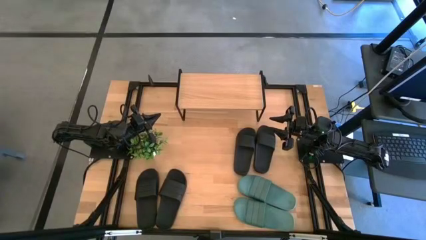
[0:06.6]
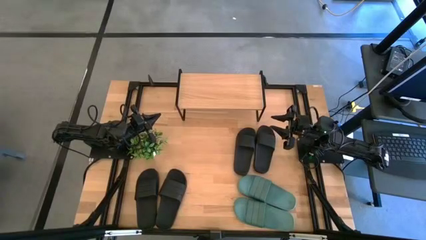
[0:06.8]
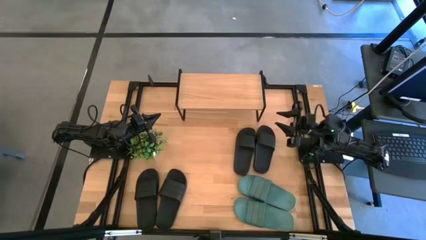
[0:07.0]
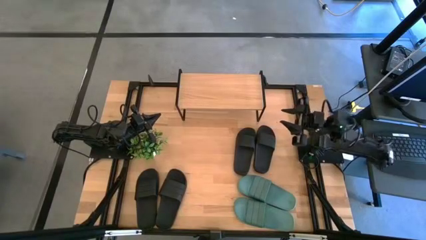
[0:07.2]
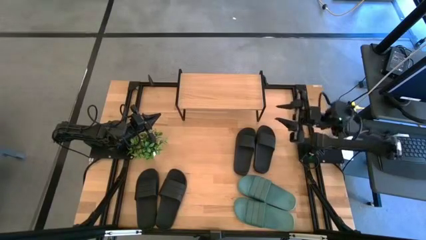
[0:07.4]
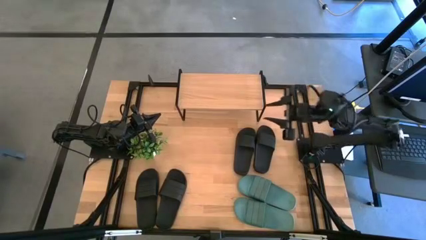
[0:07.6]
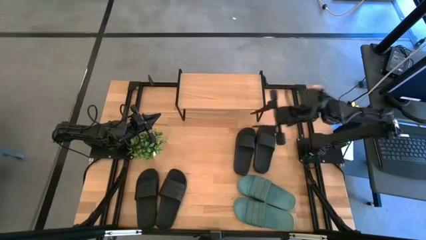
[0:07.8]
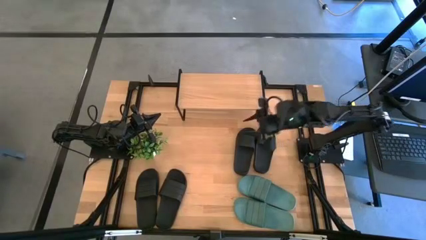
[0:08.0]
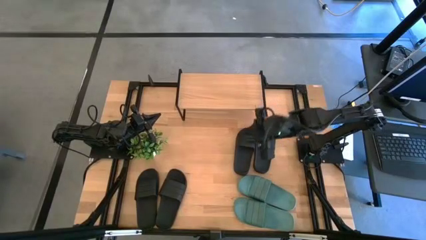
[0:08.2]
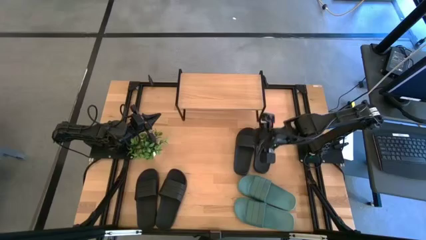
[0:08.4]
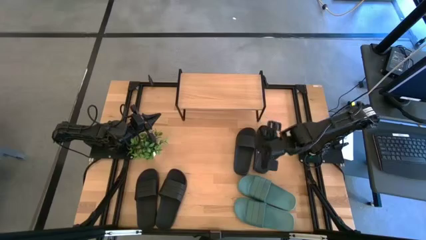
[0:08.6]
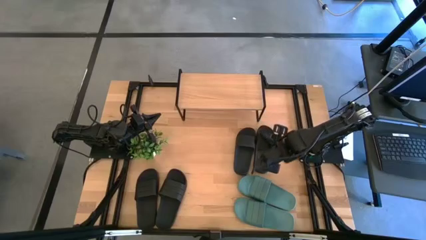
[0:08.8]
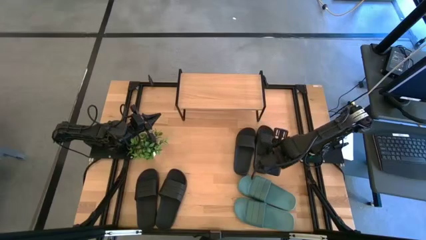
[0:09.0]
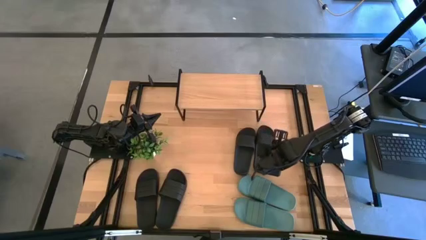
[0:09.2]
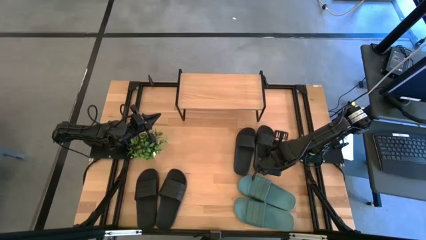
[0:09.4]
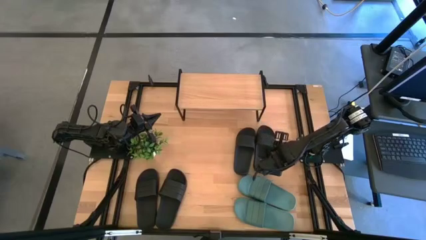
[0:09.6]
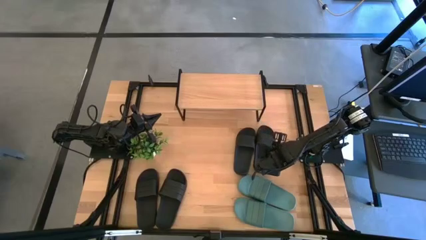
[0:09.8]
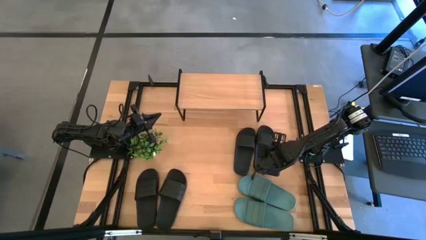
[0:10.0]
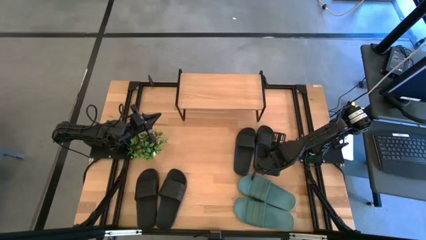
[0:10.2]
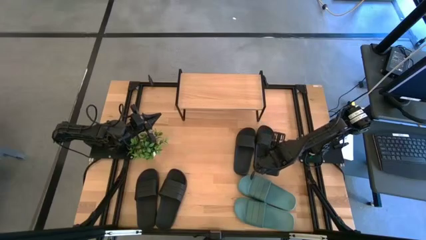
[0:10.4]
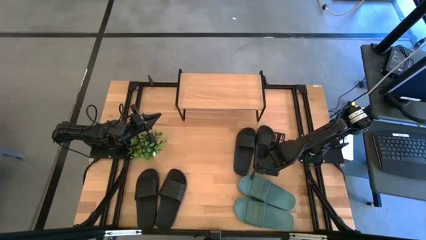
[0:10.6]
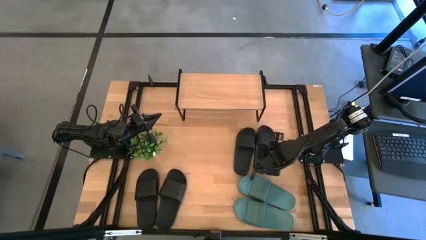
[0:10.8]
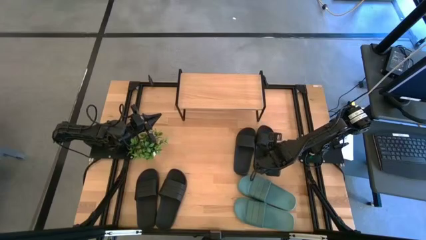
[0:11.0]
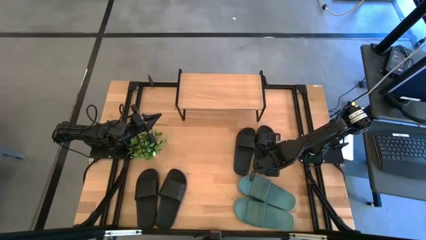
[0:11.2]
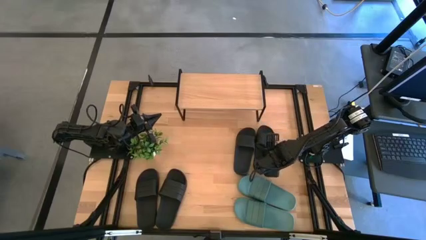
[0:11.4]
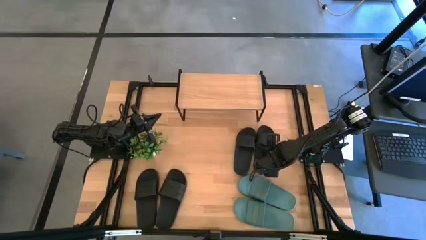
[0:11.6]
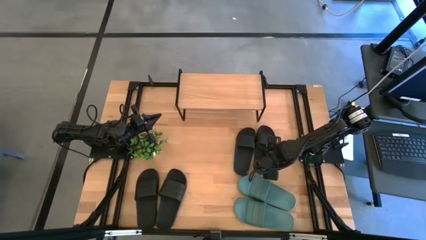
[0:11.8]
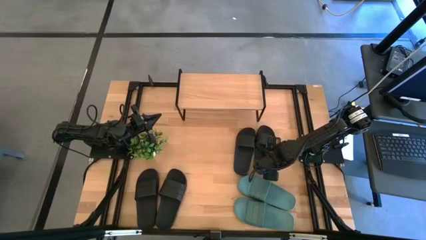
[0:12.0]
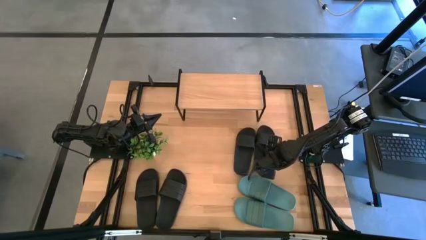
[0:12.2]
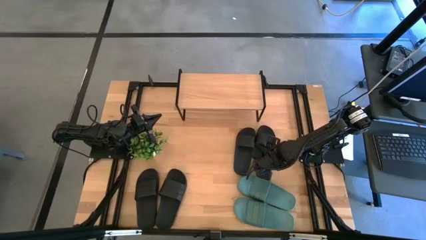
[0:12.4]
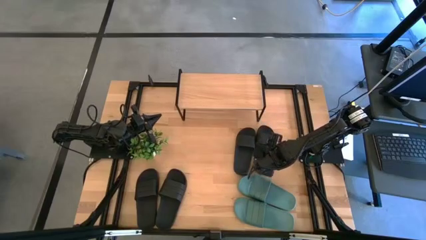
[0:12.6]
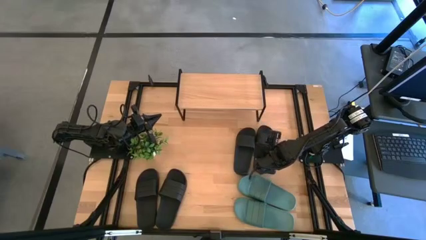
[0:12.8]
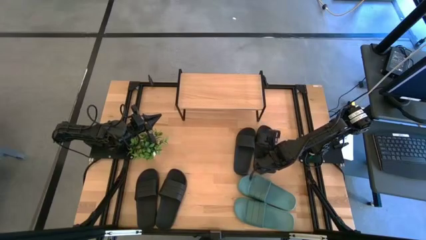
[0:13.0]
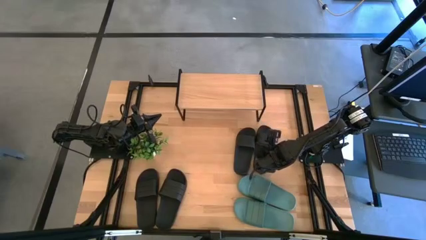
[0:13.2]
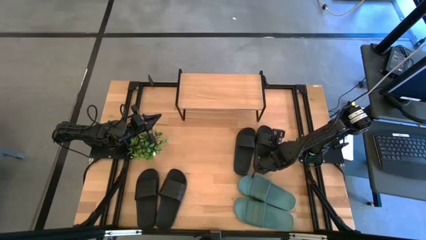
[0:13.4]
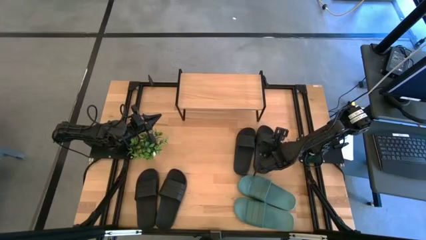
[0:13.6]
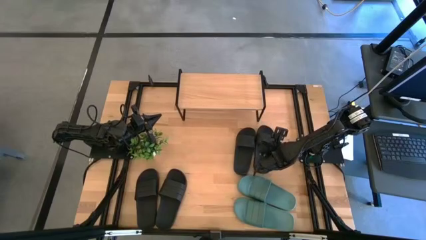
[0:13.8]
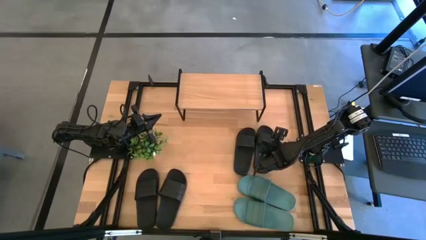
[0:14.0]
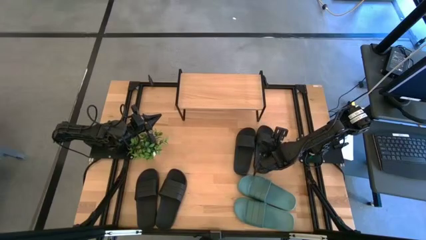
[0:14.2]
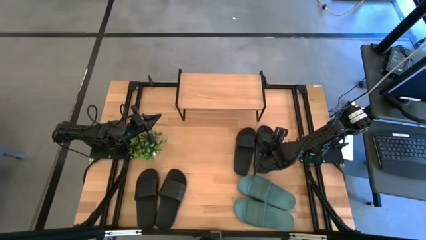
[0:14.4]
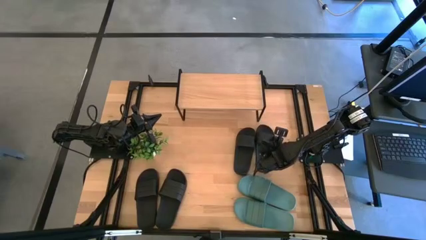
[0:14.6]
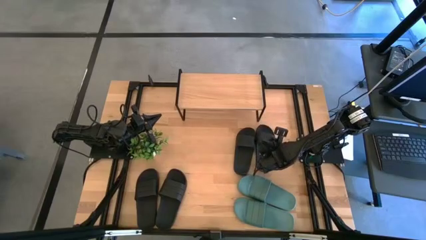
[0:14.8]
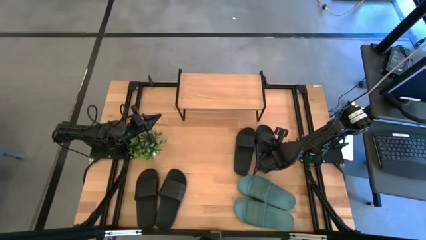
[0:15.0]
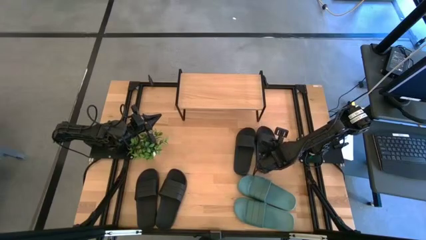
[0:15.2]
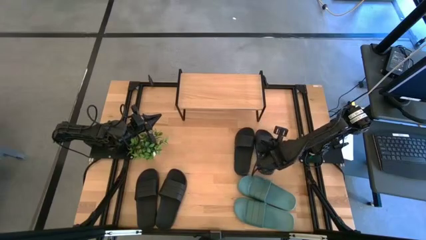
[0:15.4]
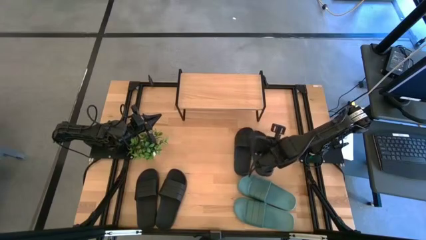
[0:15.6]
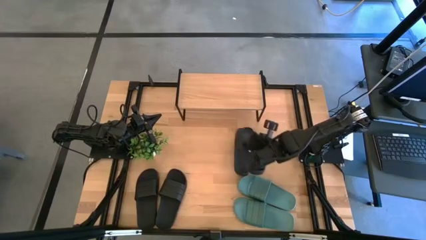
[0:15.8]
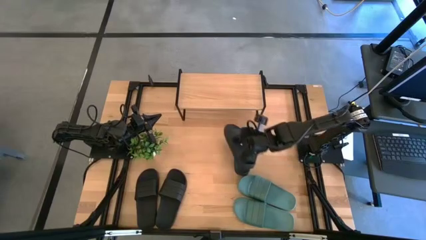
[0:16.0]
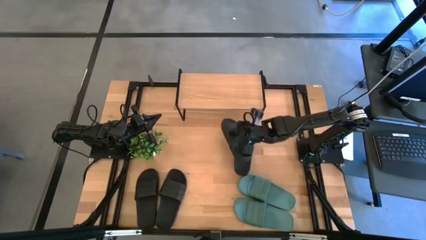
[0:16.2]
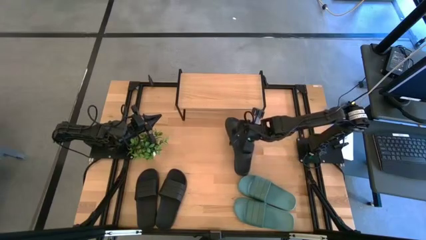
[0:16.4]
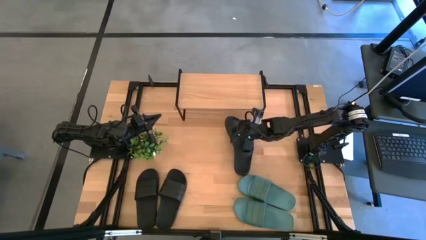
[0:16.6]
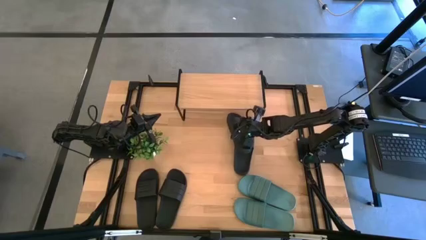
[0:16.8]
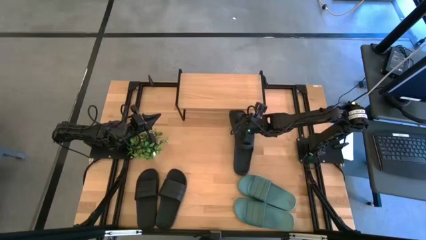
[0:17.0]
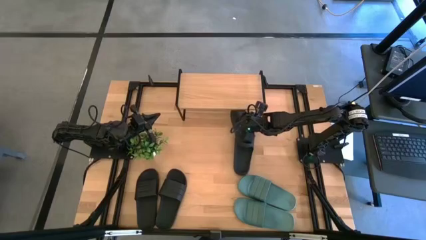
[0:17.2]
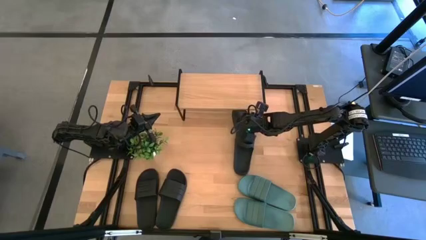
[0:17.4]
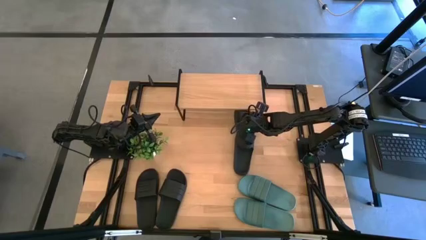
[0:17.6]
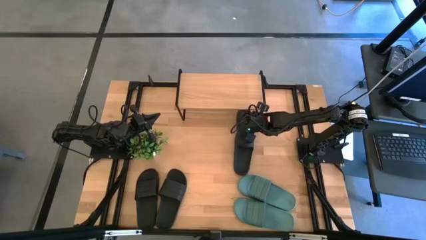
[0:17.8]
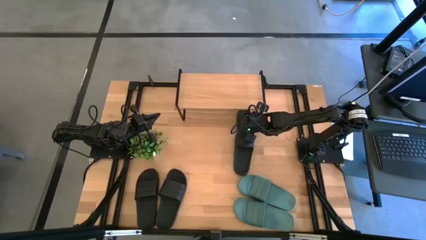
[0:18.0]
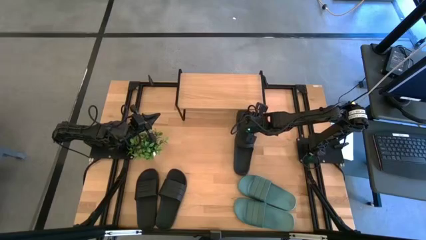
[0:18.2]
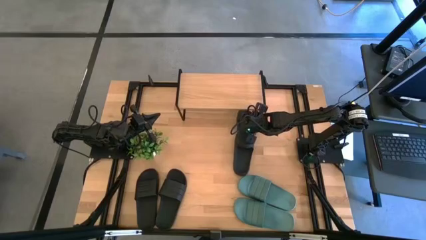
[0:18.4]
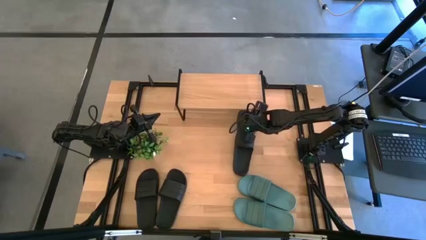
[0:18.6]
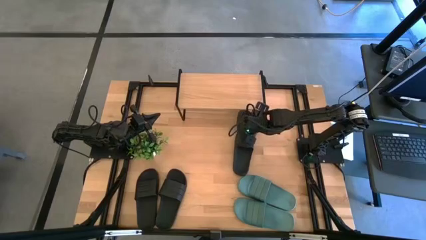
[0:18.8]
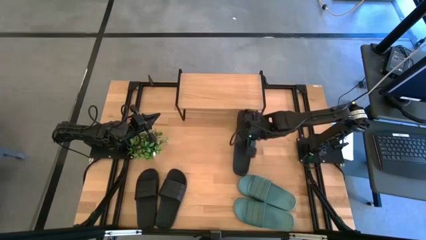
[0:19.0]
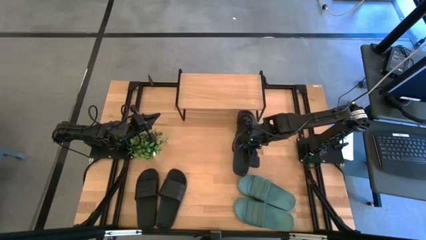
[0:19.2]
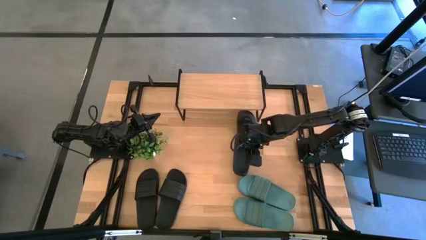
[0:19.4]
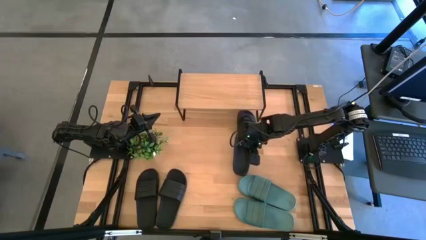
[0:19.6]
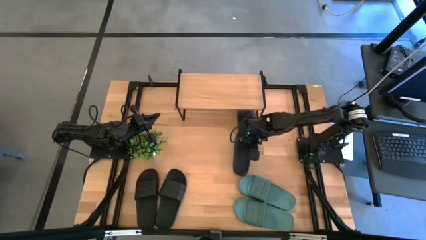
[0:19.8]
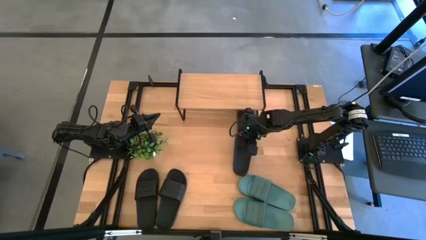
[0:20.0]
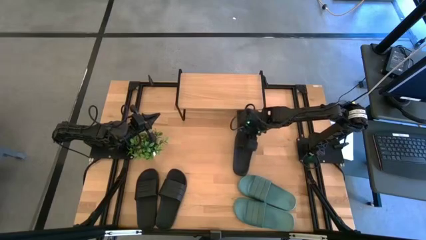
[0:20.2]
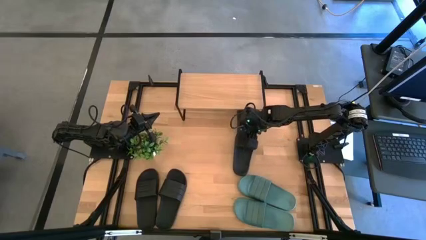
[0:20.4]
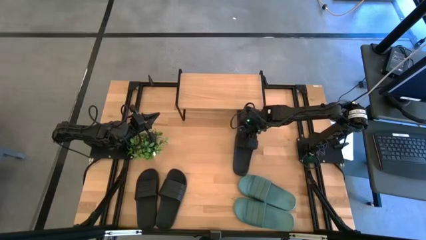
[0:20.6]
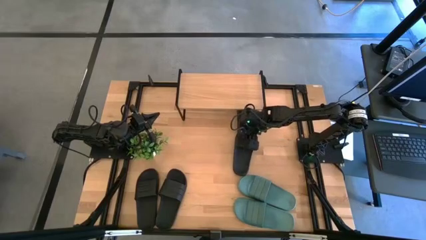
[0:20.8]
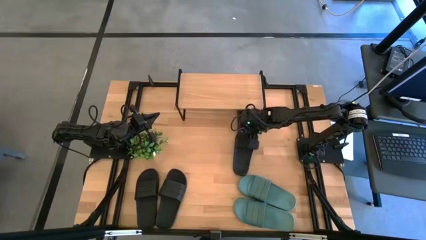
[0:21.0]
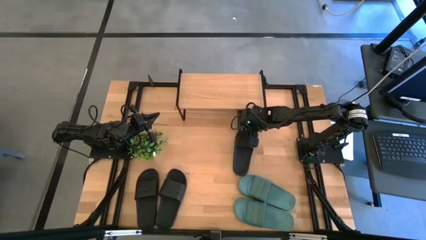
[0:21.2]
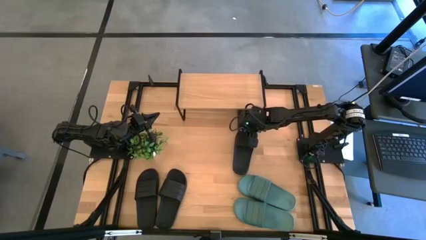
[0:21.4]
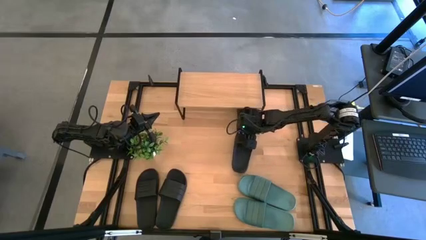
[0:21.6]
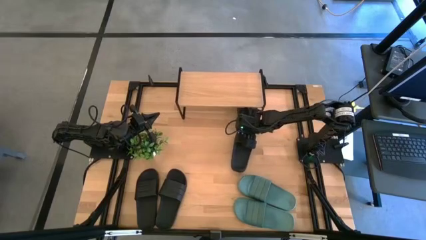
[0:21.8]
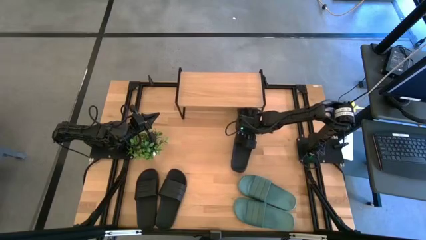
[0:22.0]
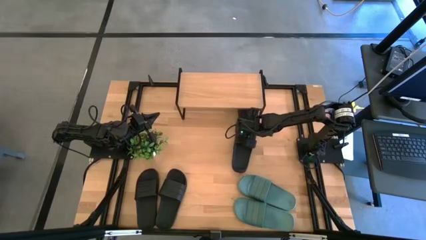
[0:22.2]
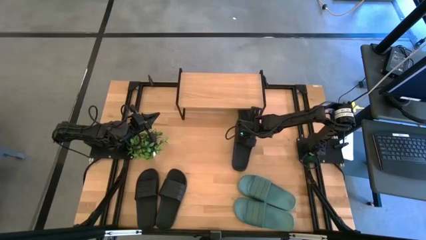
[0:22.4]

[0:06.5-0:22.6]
Task: Pick and place slides into the shelf
Put the black slide under the shelf
